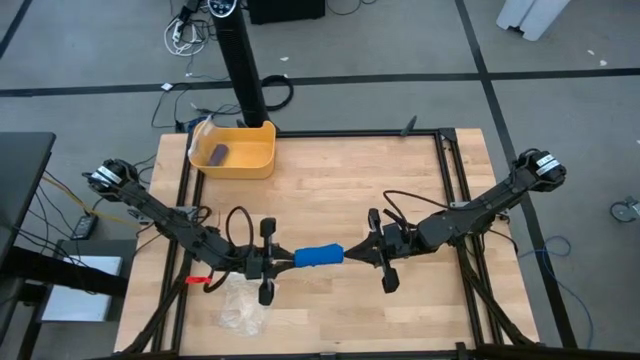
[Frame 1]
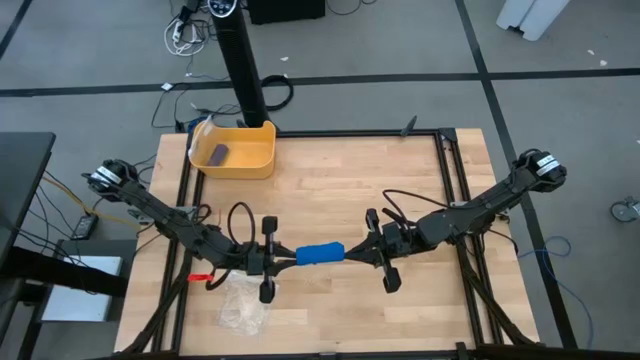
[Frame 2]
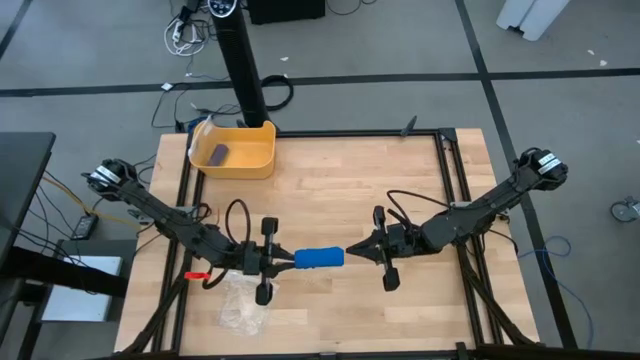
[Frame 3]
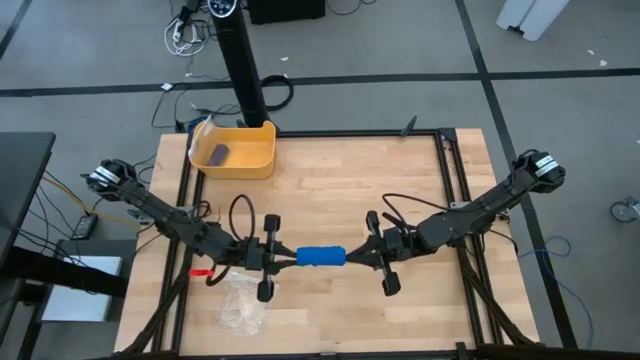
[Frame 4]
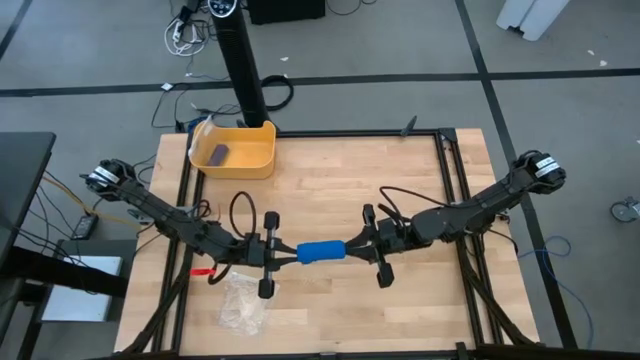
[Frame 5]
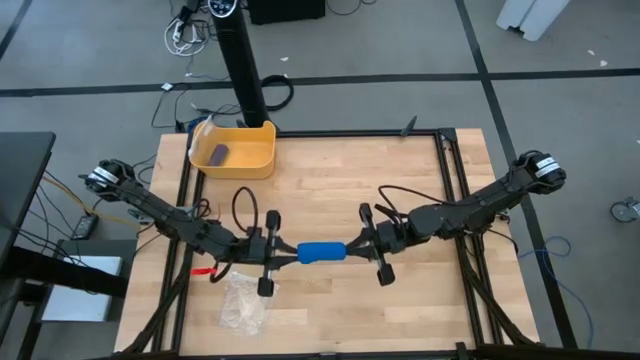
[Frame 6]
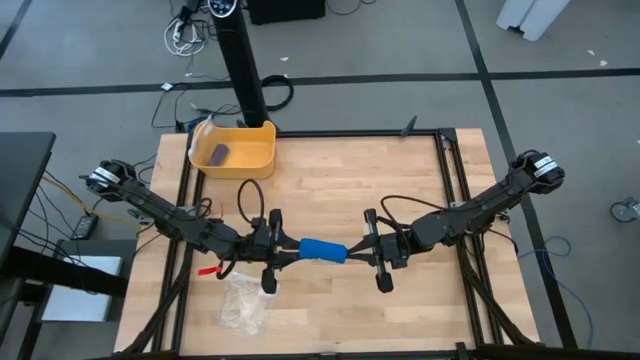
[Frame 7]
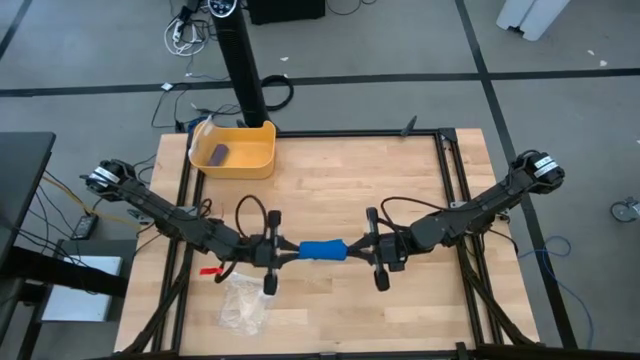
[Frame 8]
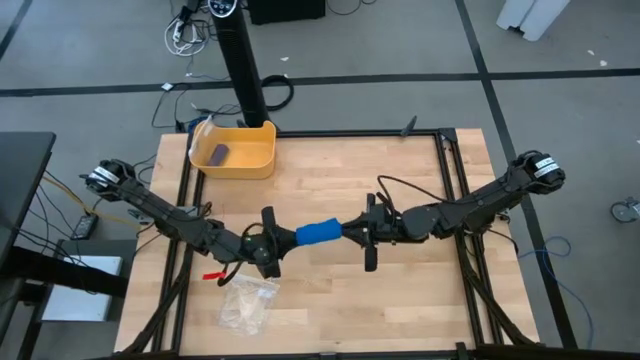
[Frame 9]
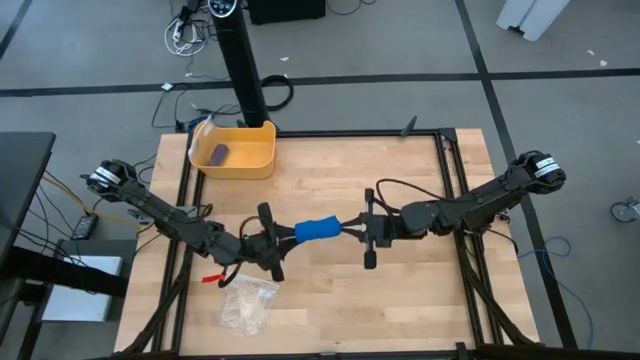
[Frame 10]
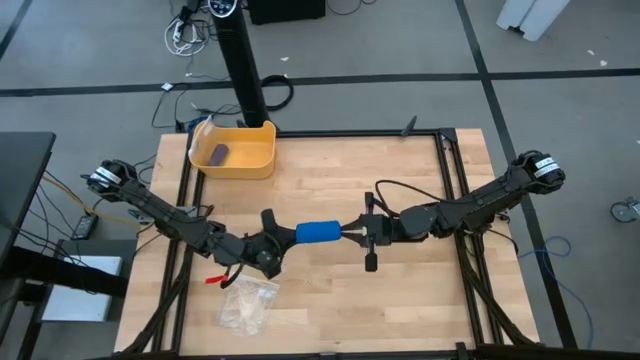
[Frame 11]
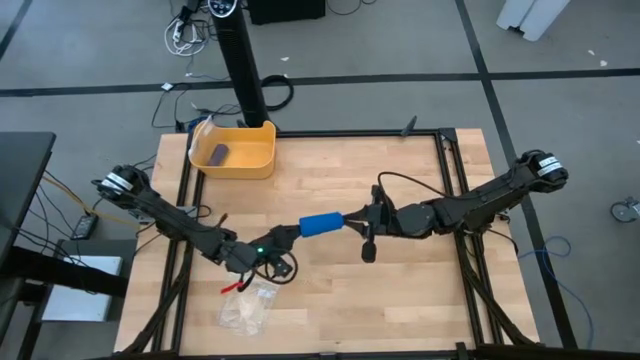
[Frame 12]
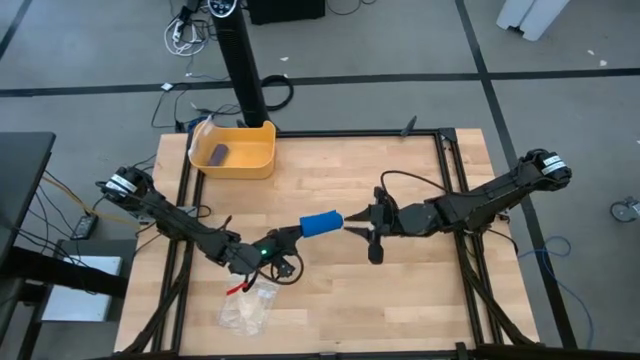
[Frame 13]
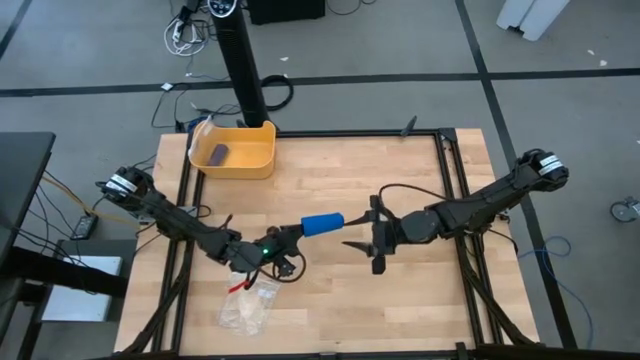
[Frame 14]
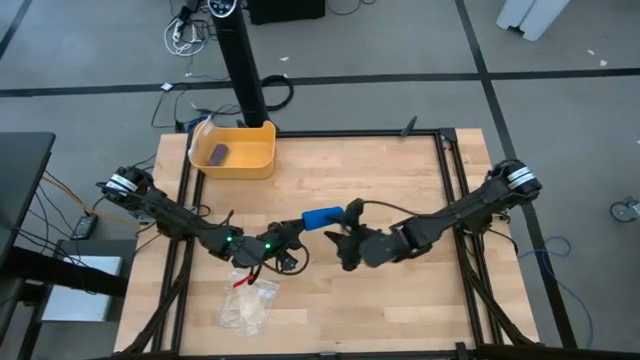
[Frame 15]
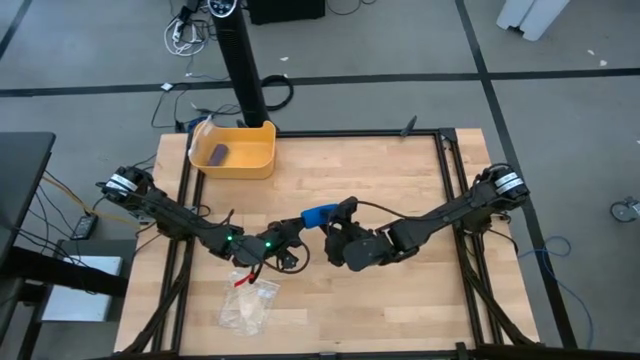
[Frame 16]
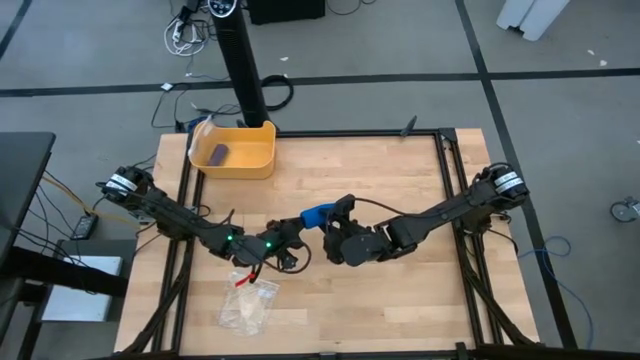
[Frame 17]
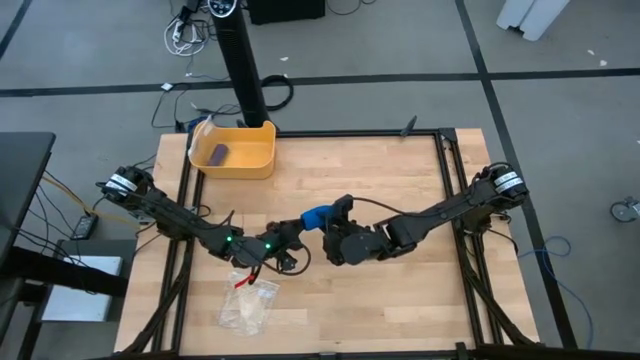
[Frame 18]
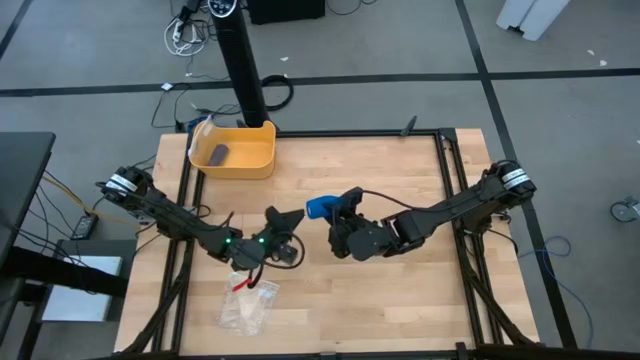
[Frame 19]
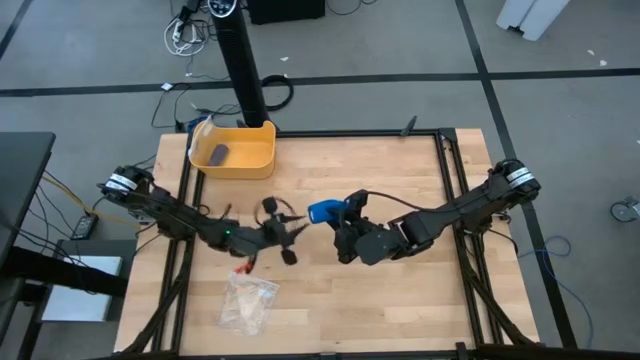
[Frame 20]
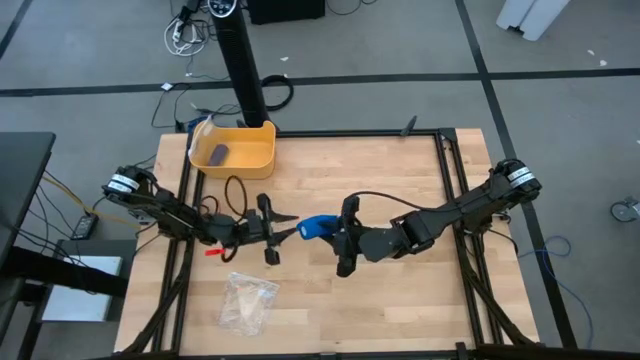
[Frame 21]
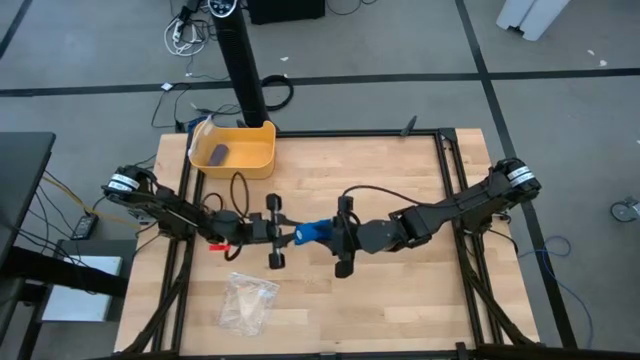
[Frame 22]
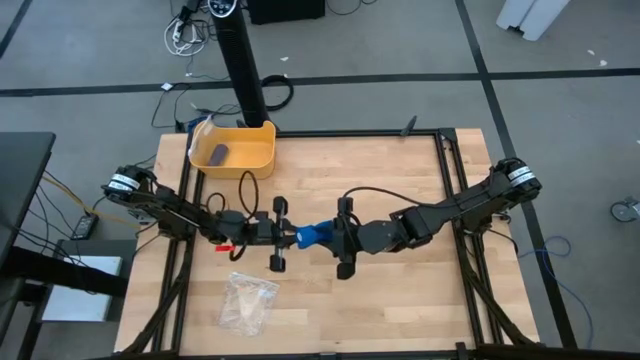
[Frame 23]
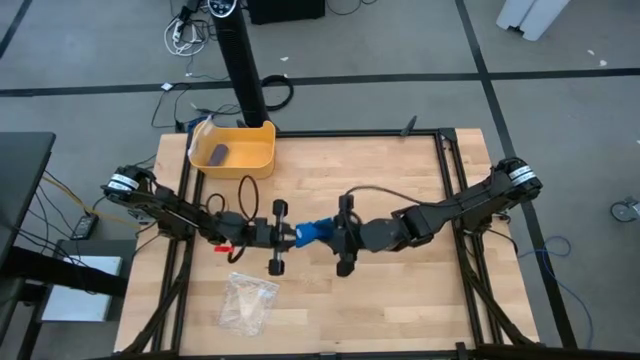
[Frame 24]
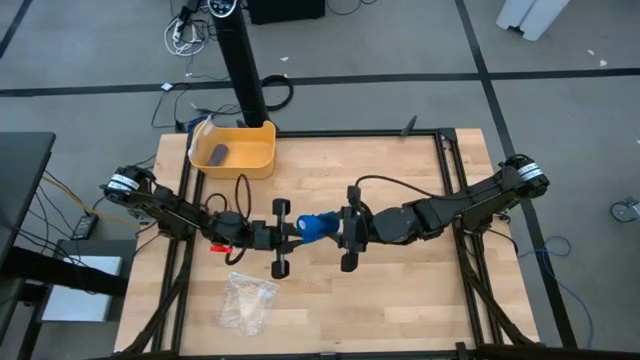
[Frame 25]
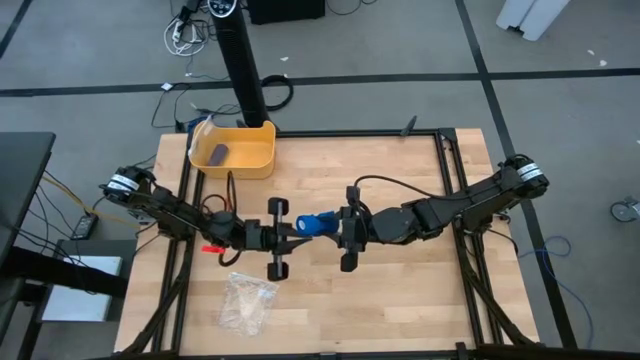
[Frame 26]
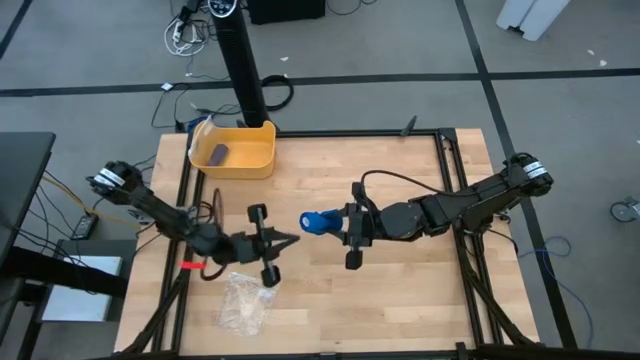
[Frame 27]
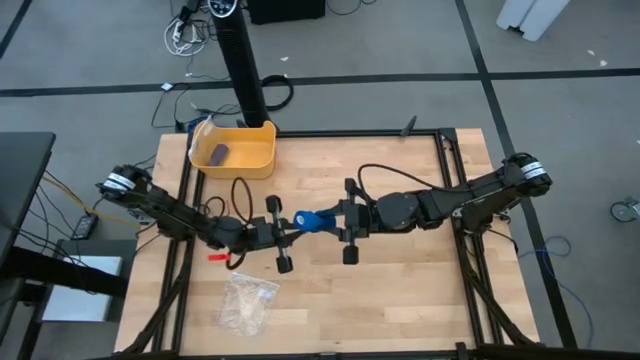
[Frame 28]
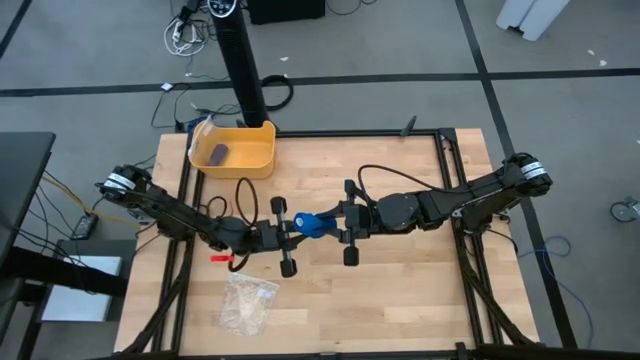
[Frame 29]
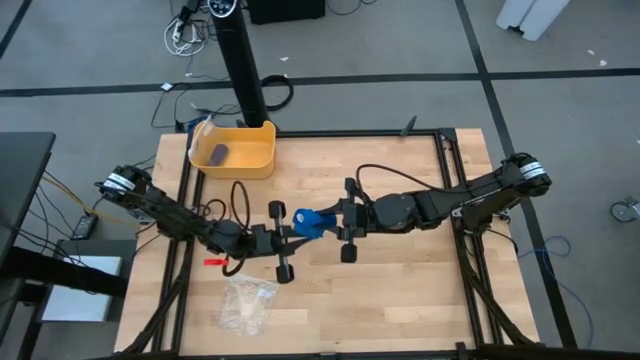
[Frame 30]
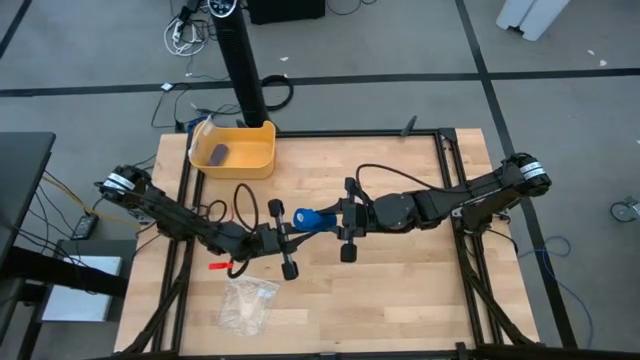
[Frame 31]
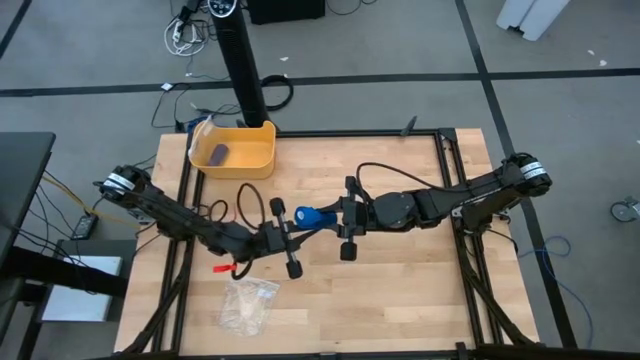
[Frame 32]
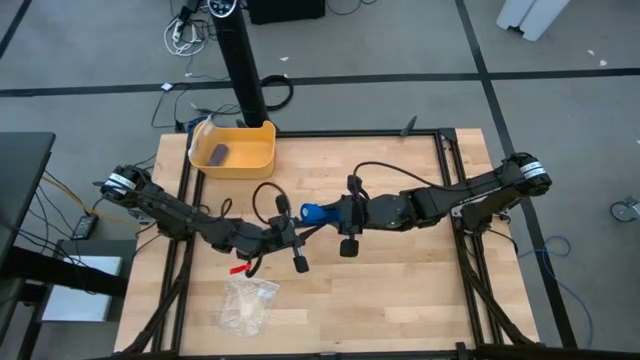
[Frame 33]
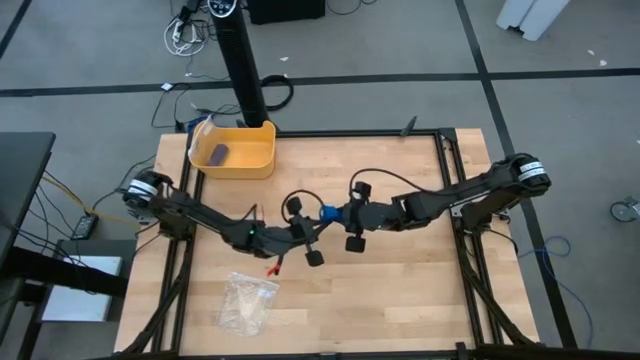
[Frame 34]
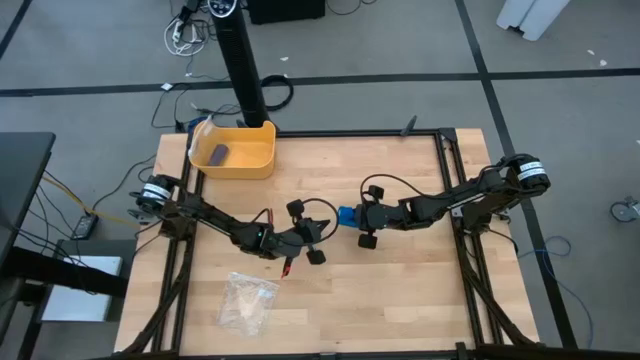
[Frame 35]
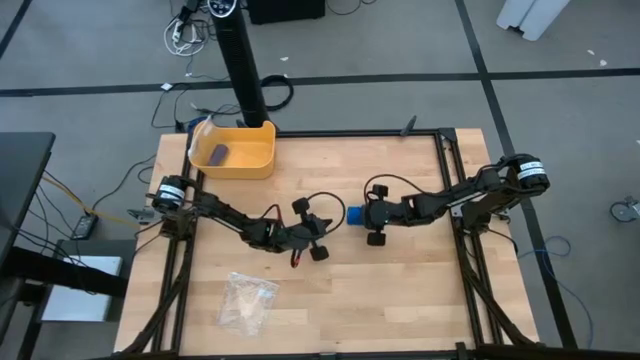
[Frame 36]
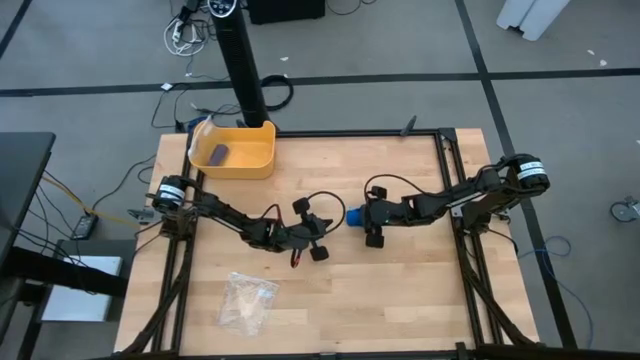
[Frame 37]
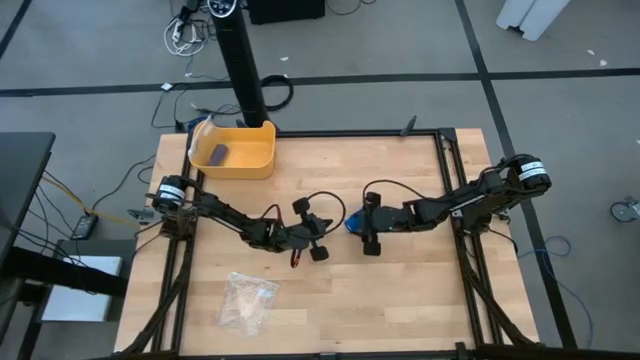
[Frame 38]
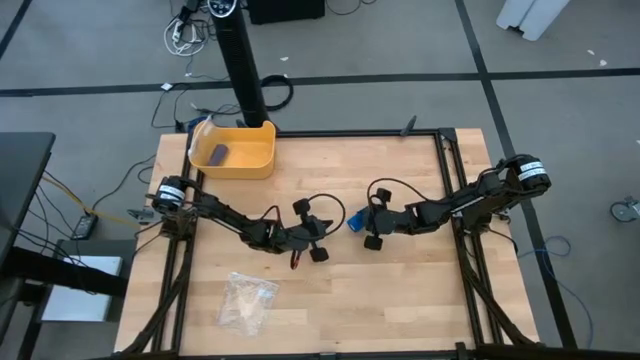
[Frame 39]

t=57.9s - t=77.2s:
Task: Roll bandage
Roll the blue bandage

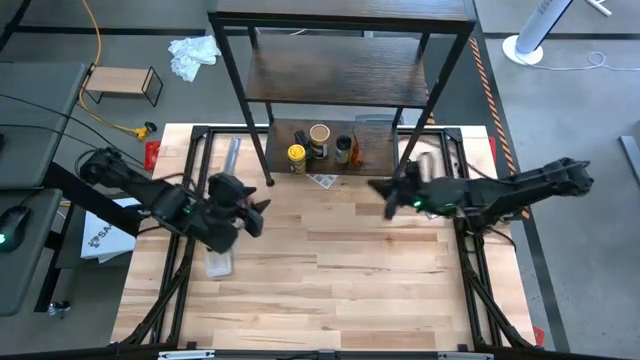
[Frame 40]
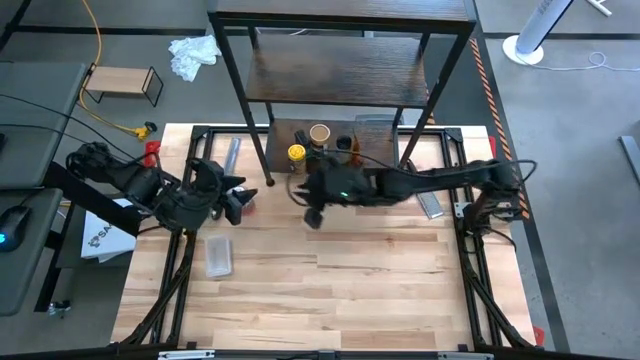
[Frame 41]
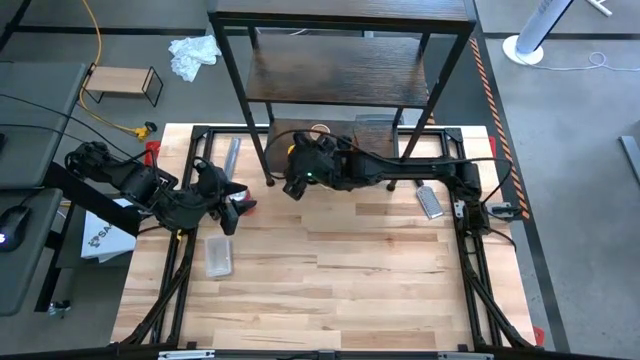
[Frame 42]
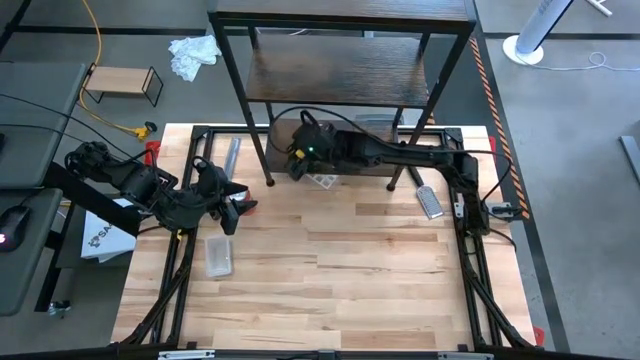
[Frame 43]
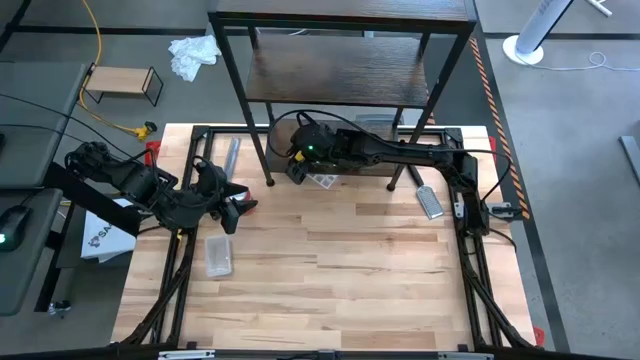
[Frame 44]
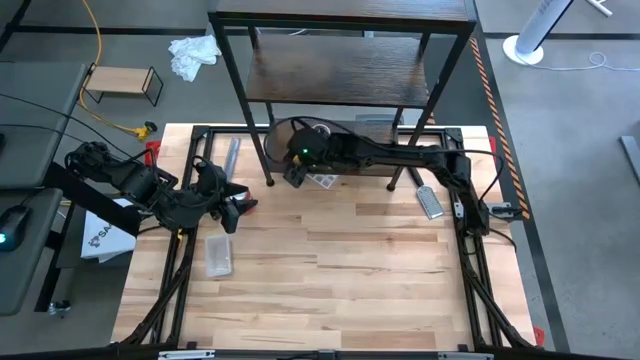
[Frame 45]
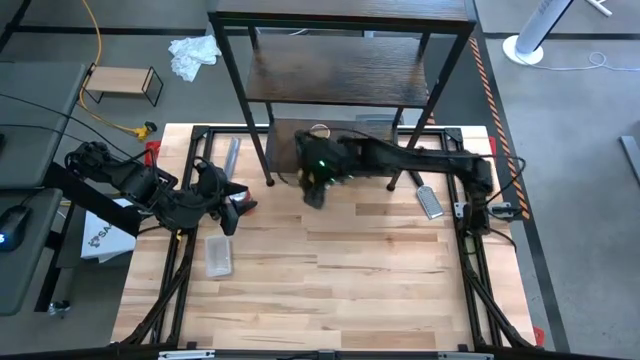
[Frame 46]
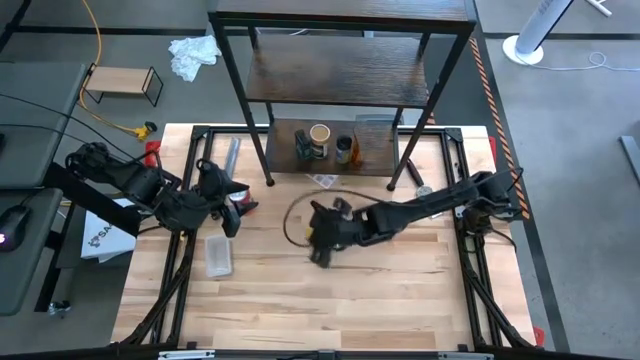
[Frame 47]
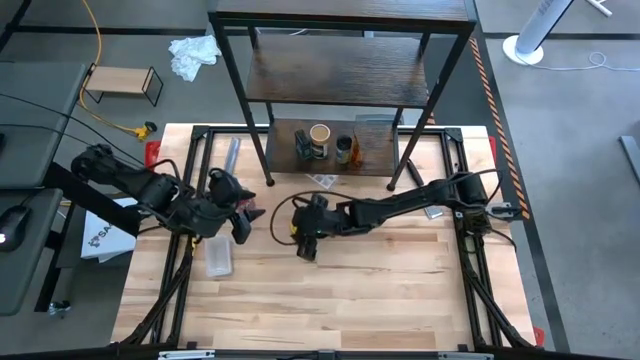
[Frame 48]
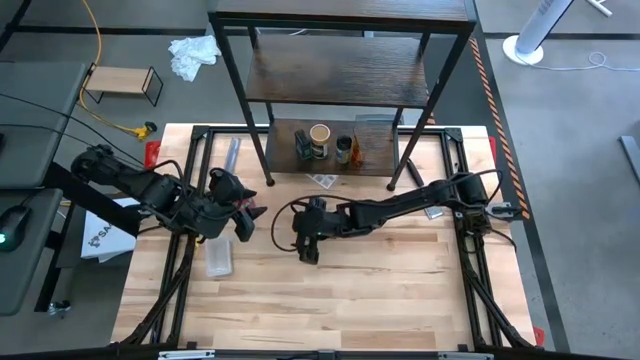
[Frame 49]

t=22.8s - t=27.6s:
Task: Shelf spices
Remove the yellow seasoning bottle from the bottom shelf
